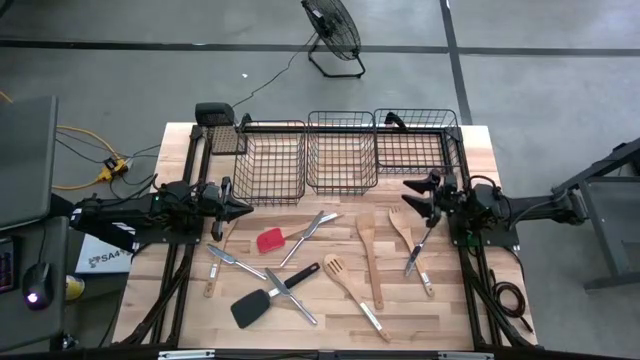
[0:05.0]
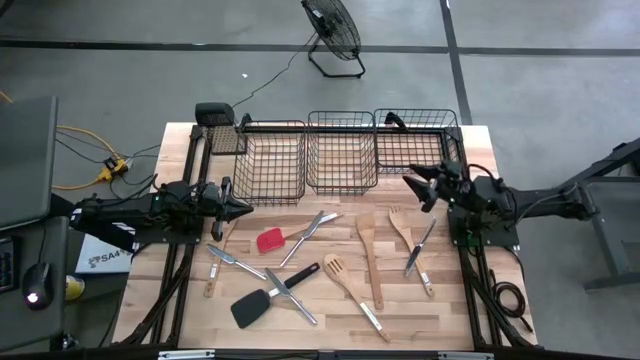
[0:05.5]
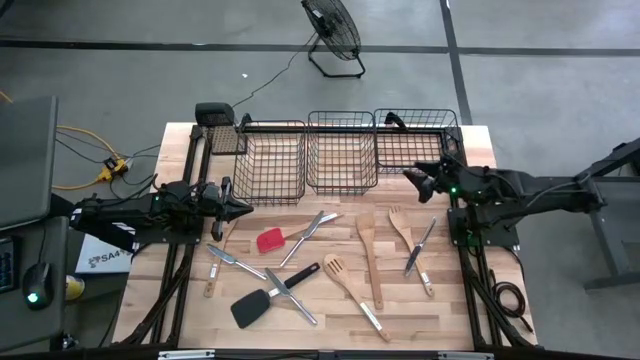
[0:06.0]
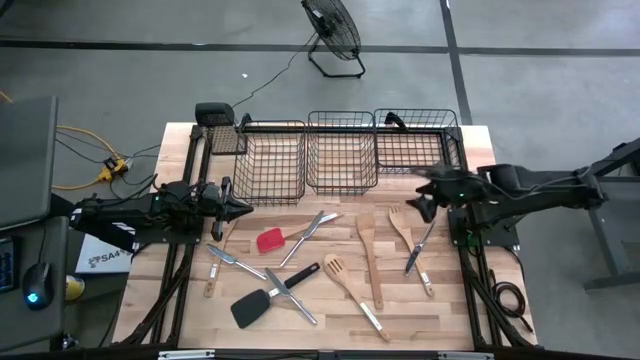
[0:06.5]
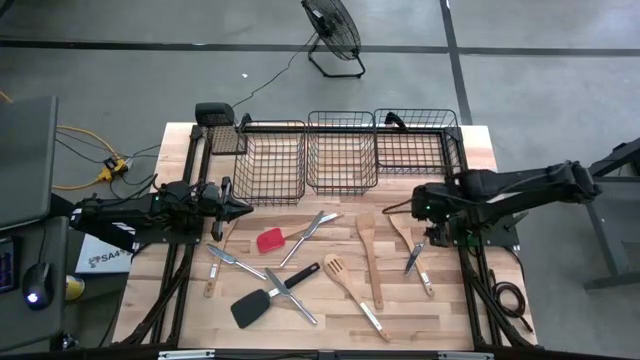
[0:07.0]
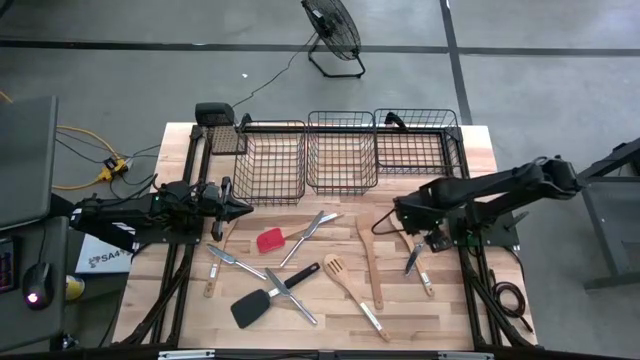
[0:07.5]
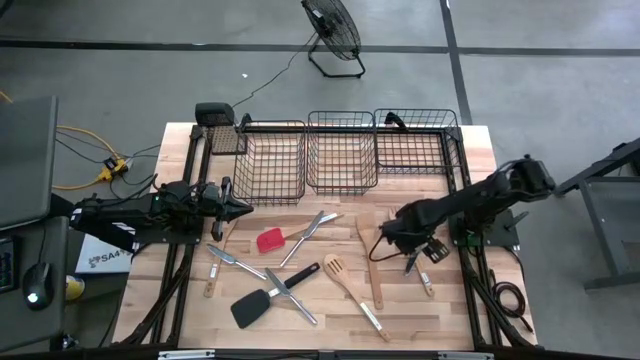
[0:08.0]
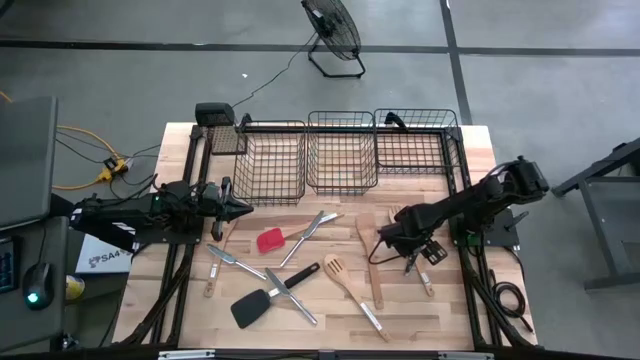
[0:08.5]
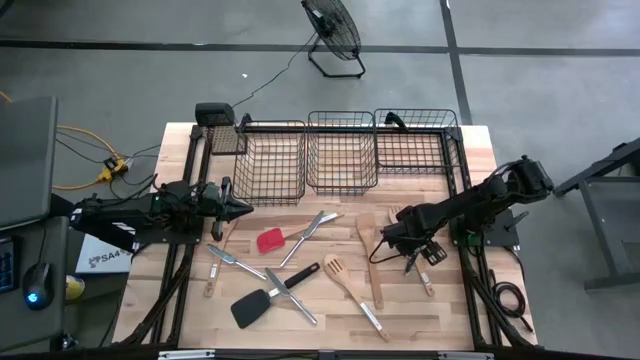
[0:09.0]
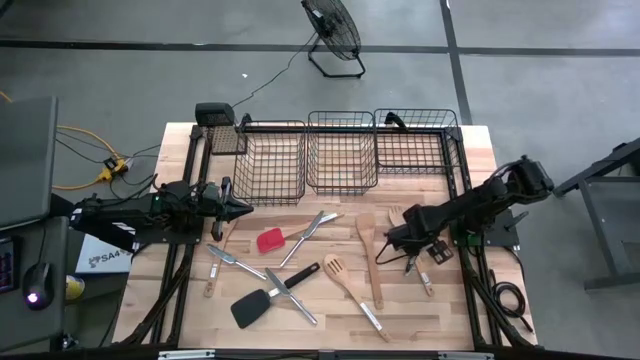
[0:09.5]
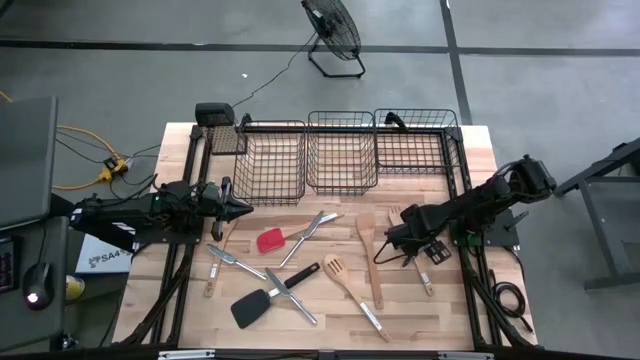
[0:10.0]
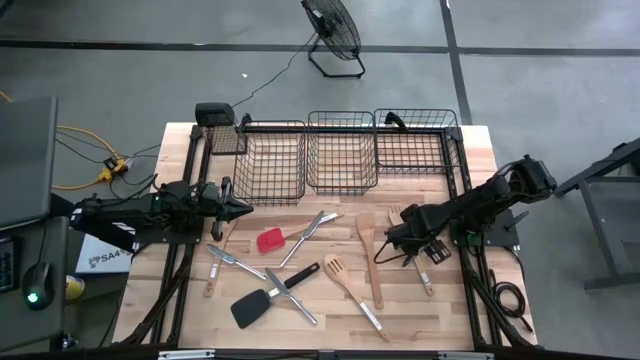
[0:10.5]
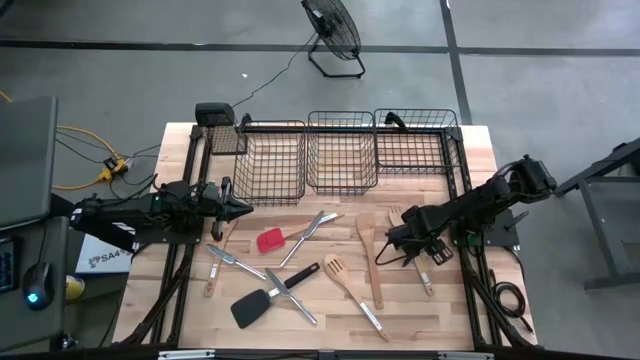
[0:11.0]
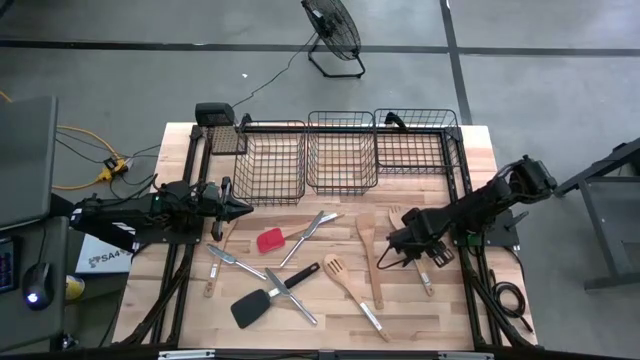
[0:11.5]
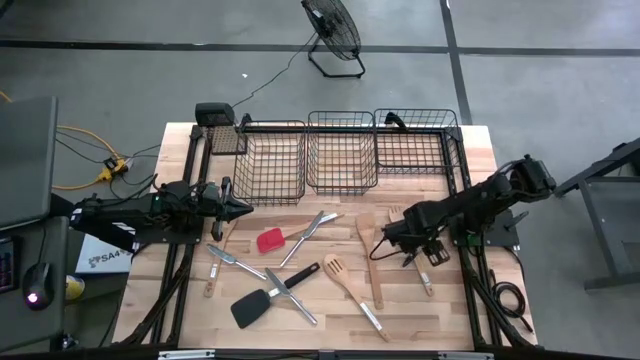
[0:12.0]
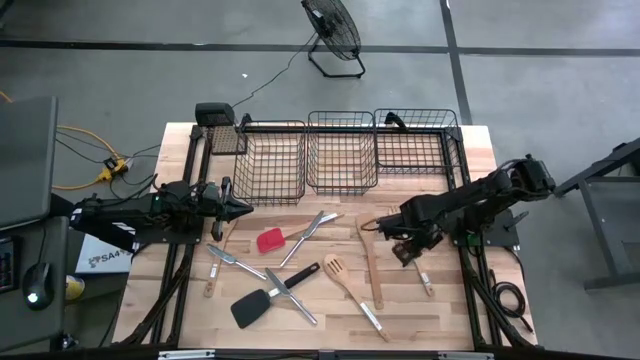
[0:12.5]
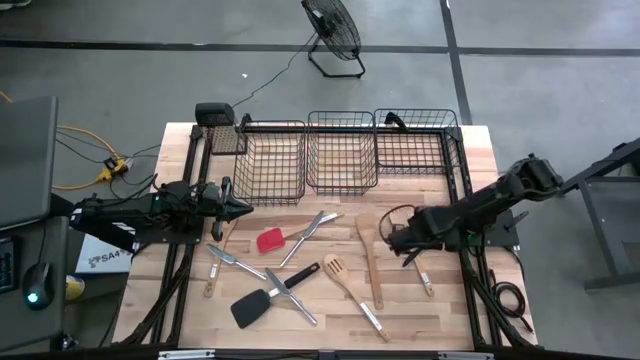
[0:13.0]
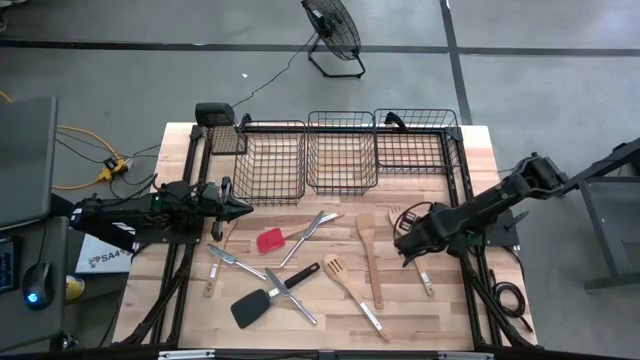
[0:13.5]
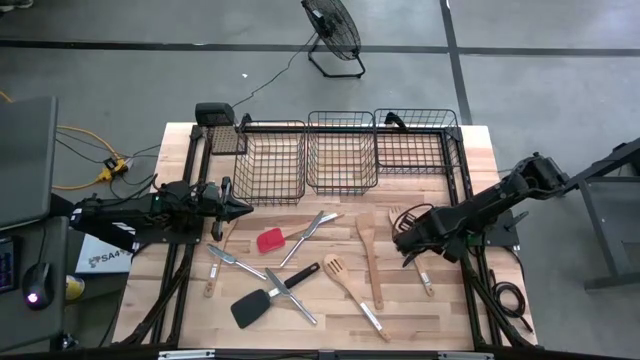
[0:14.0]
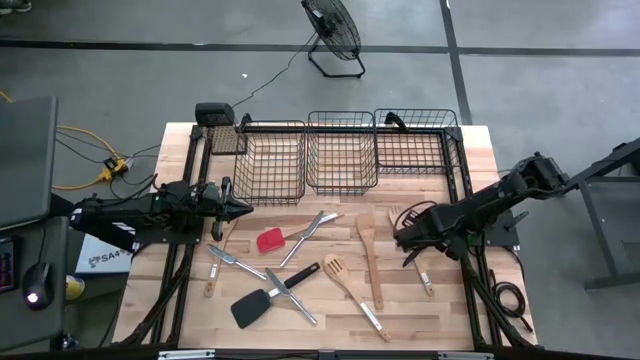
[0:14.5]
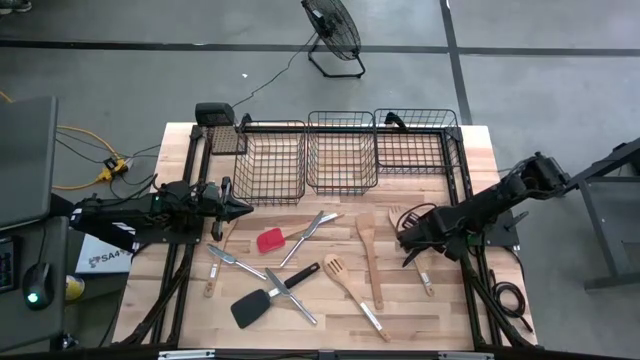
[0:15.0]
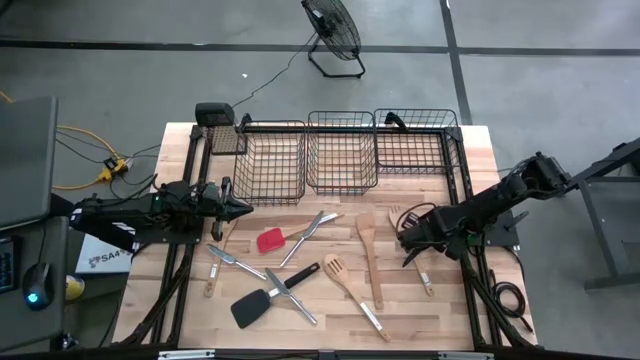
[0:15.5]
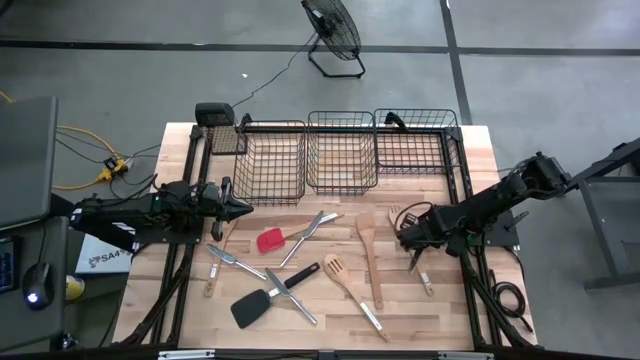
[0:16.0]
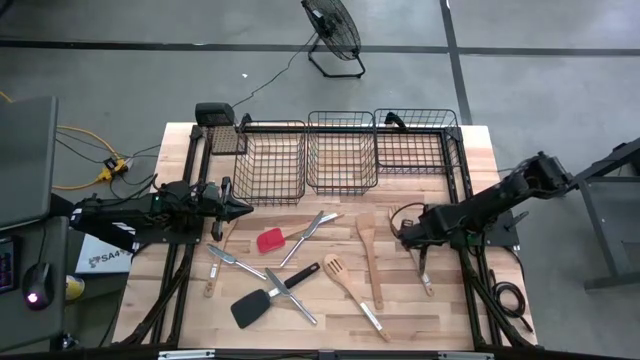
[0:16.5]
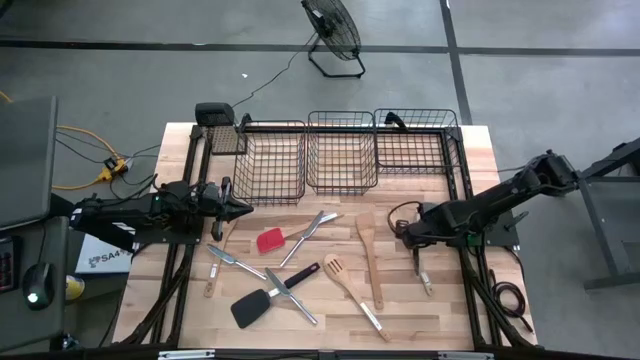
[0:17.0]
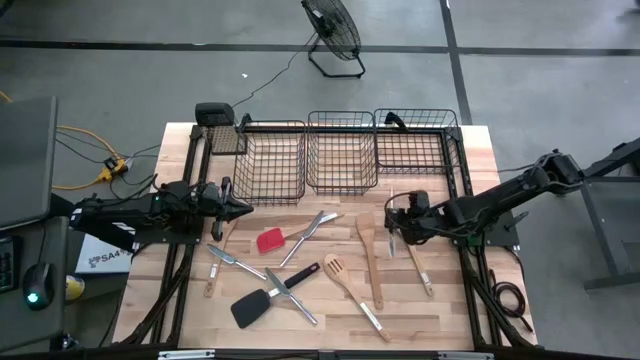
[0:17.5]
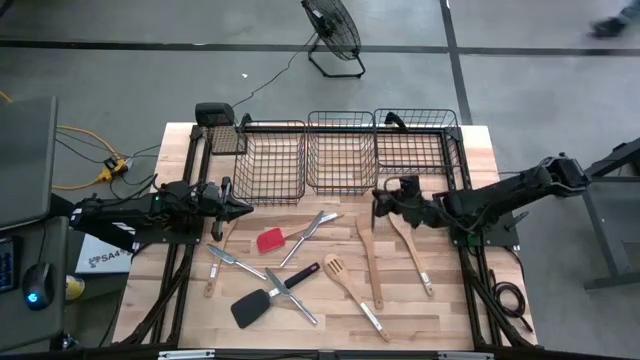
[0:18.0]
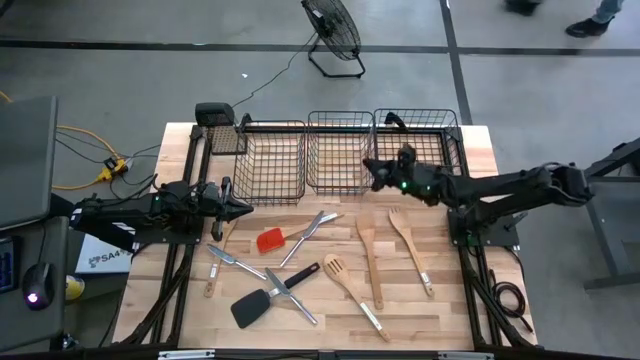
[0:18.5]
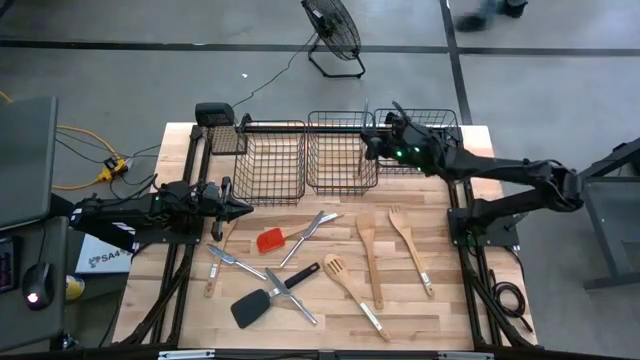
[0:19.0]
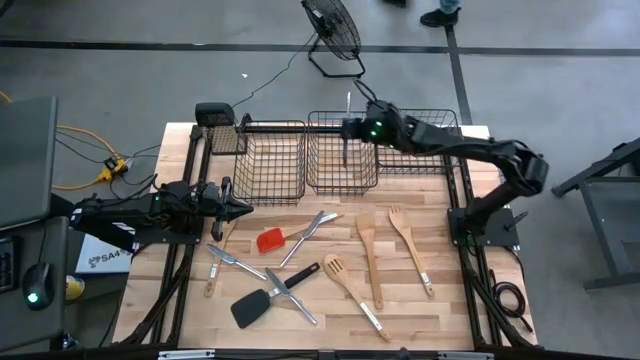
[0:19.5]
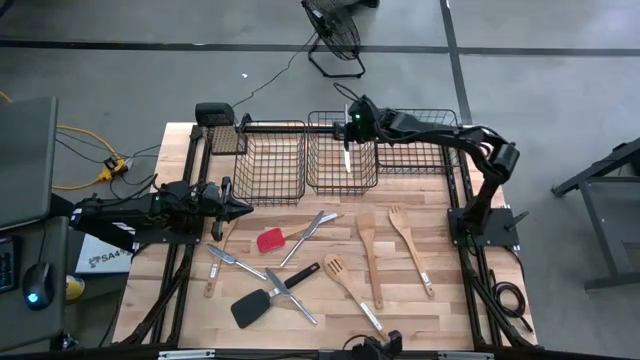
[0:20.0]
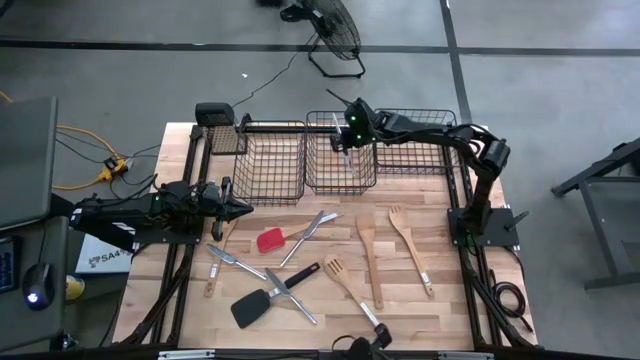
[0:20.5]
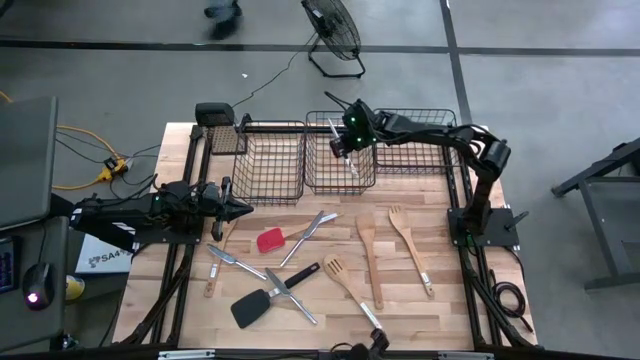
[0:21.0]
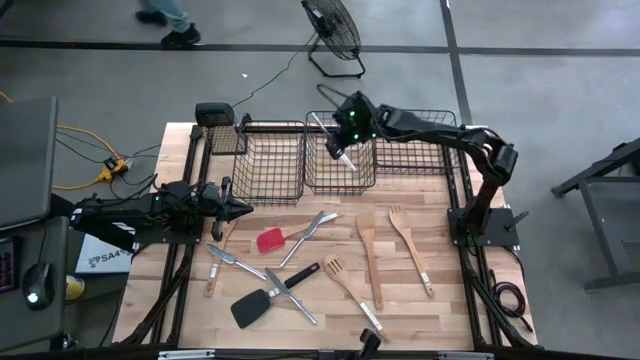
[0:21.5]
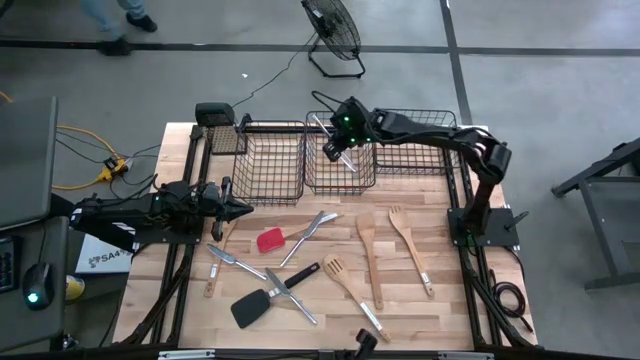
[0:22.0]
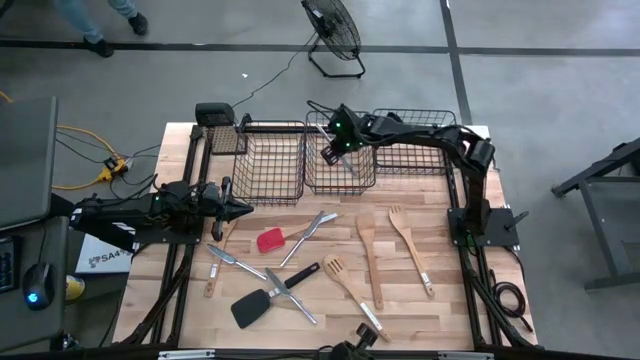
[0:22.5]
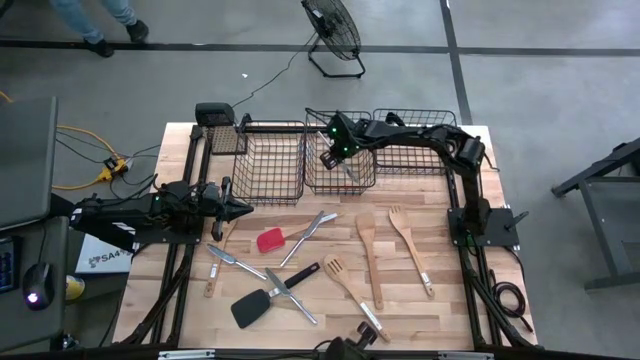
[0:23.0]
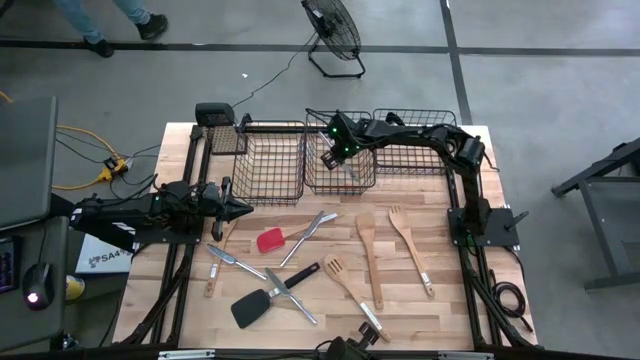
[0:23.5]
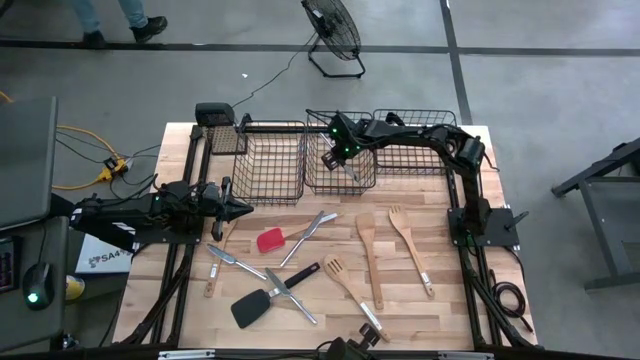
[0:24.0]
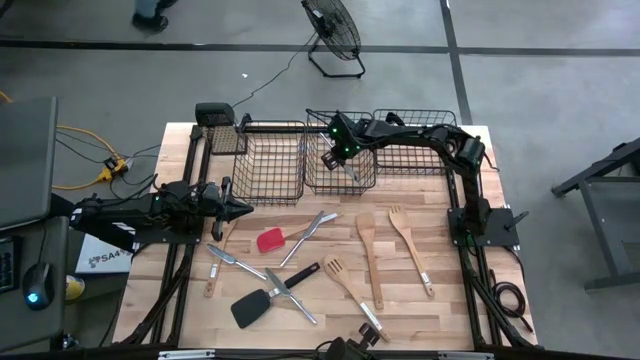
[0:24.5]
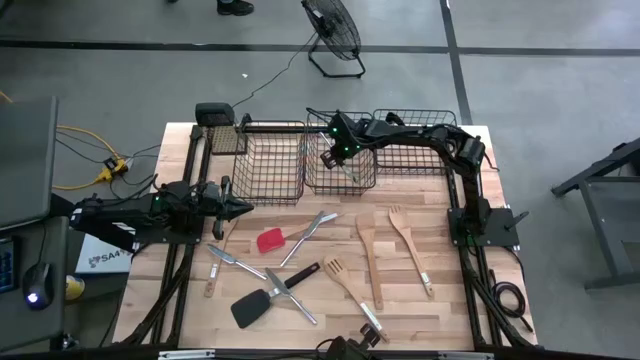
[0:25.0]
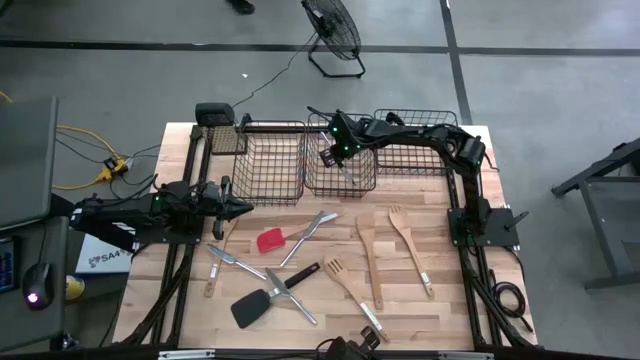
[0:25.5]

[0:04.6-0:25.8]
Task: Pick & Place Kitchen Items
Put the silver knife into the middle wire basket
